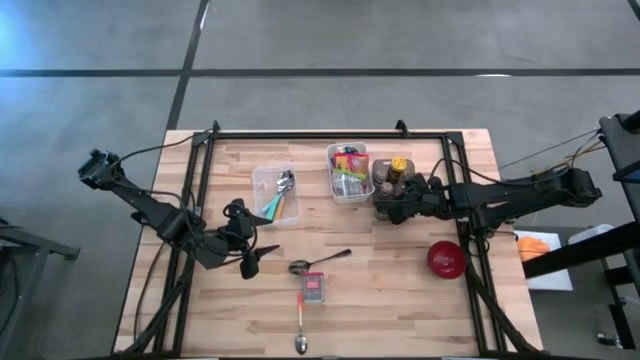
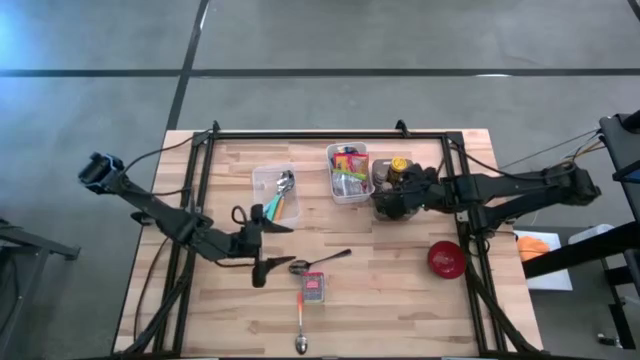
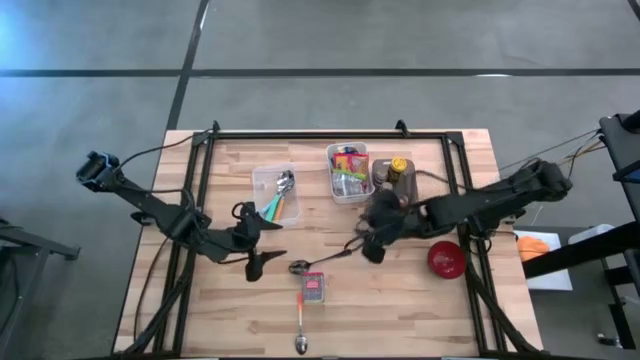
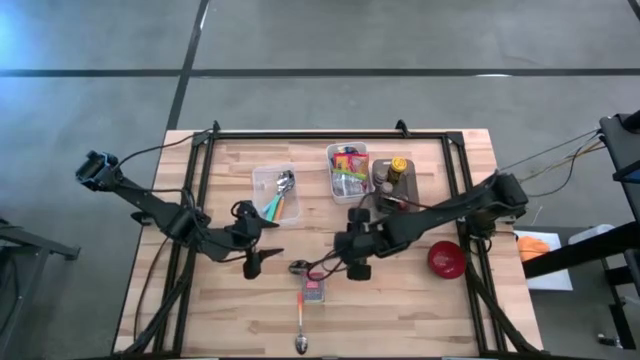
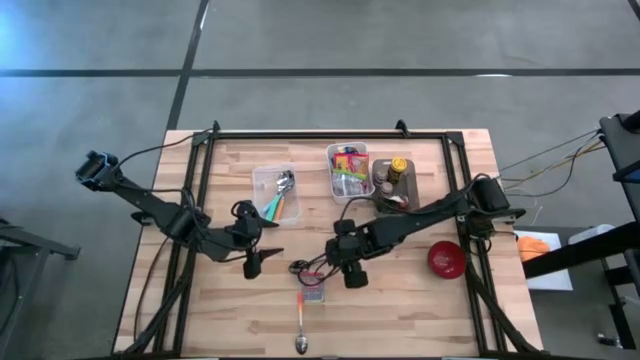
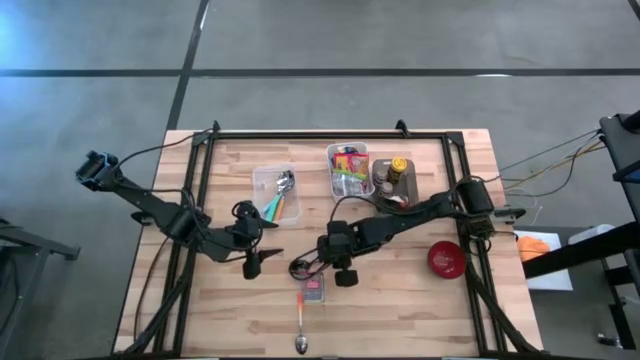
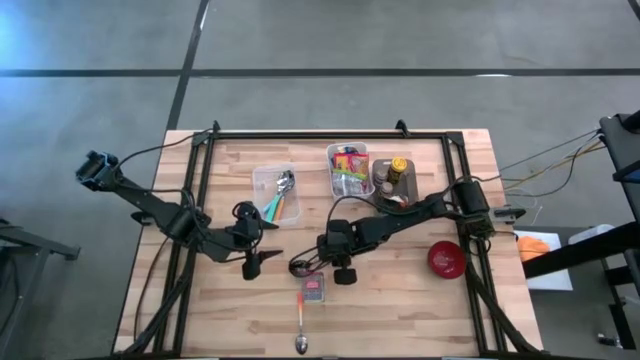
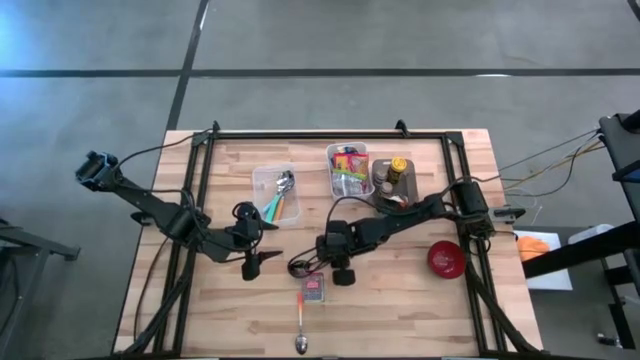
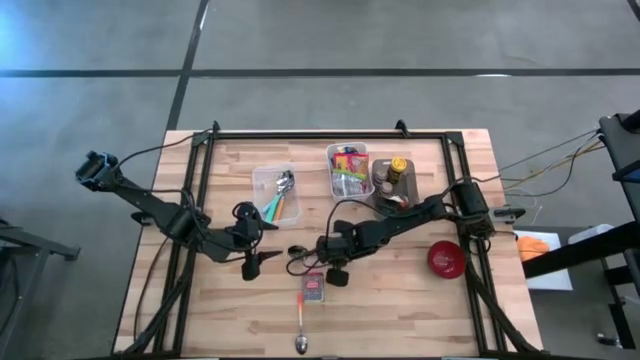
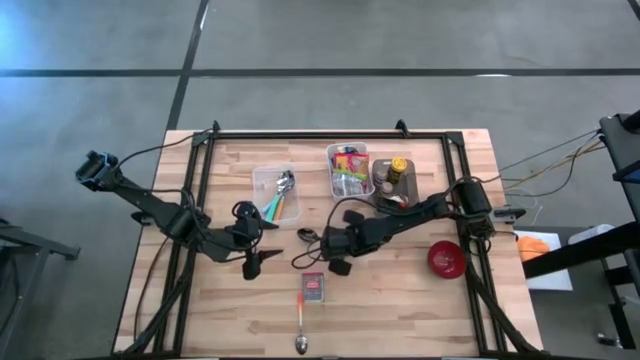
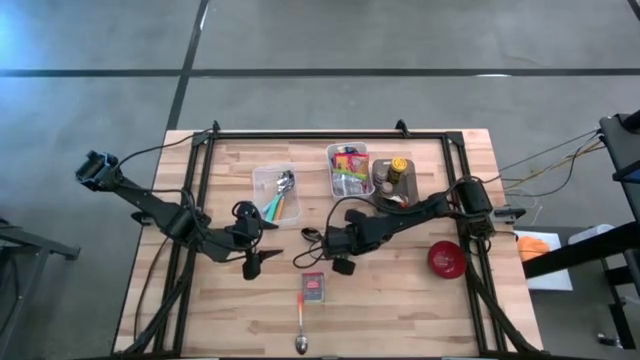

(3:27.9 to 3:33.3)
Put the black spoon into the transparent bin

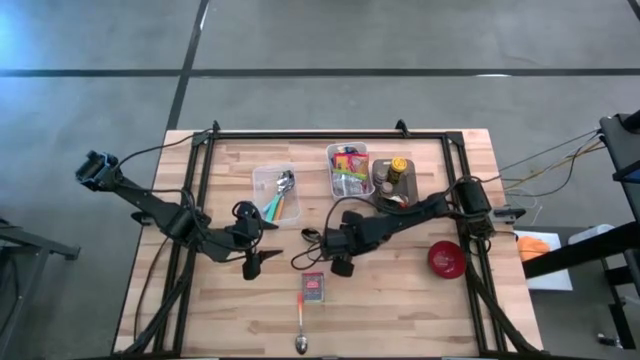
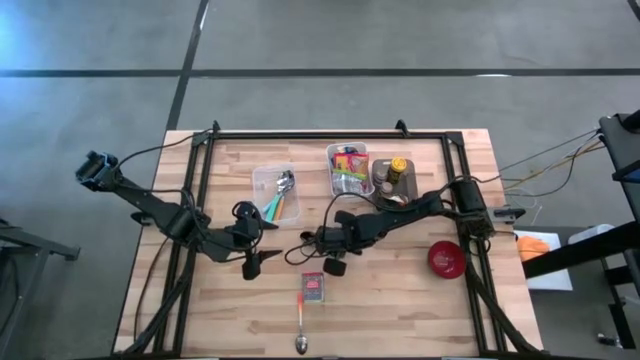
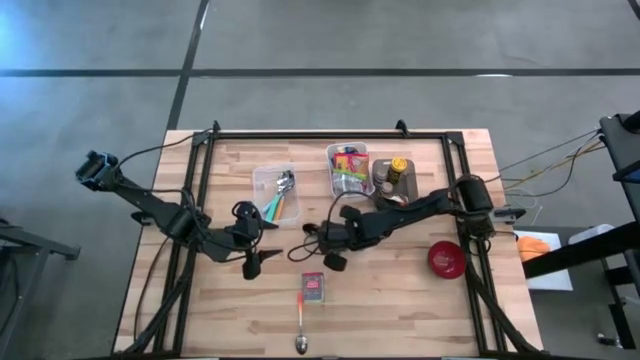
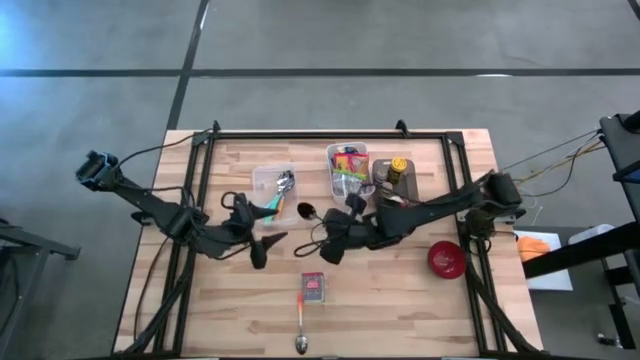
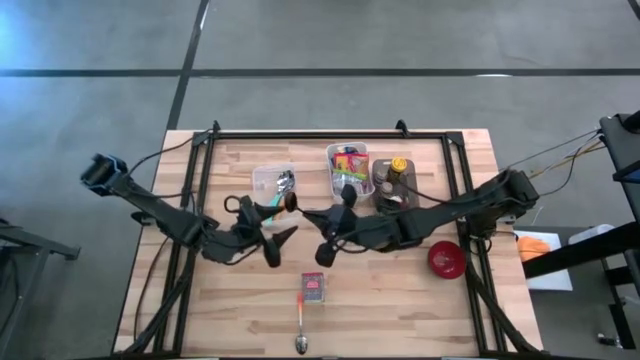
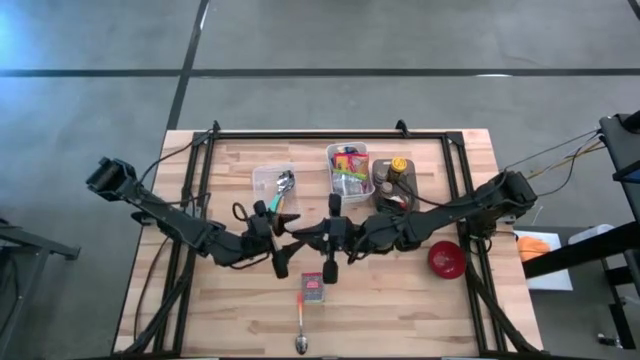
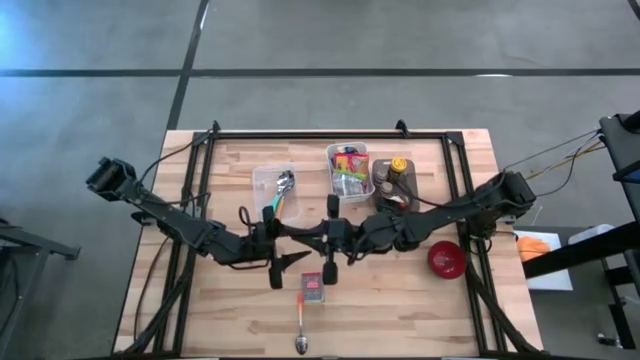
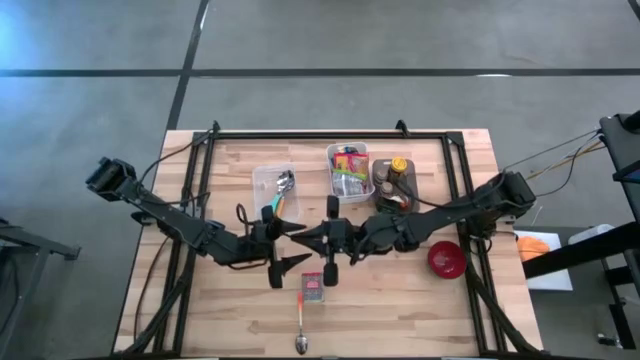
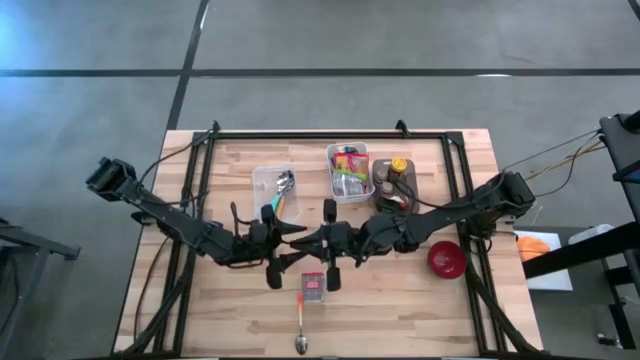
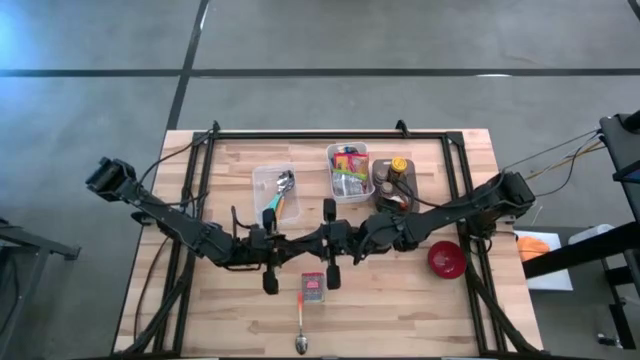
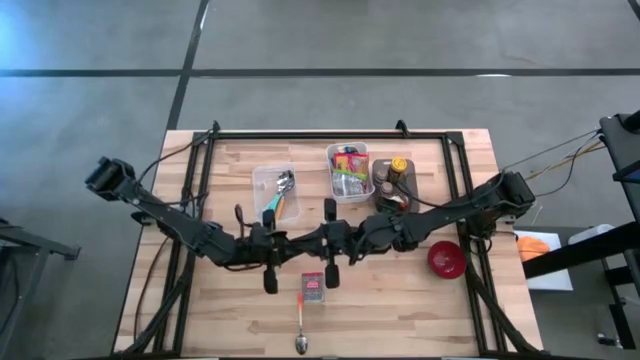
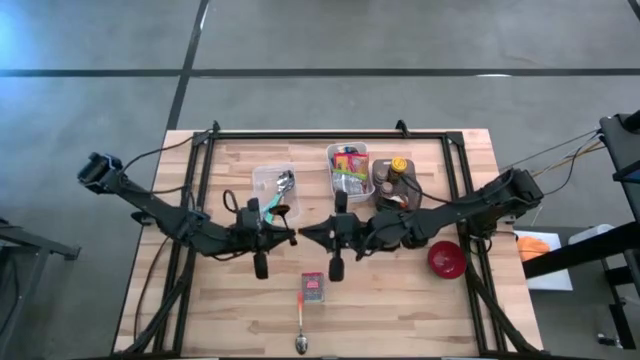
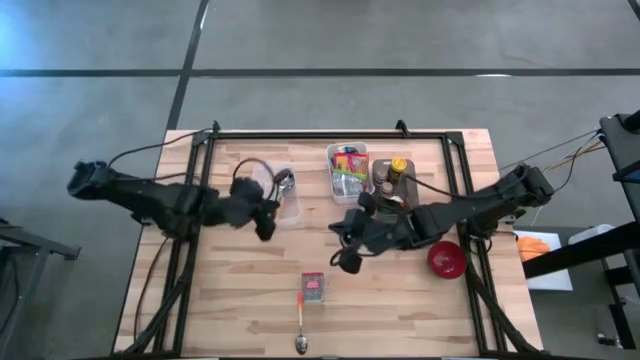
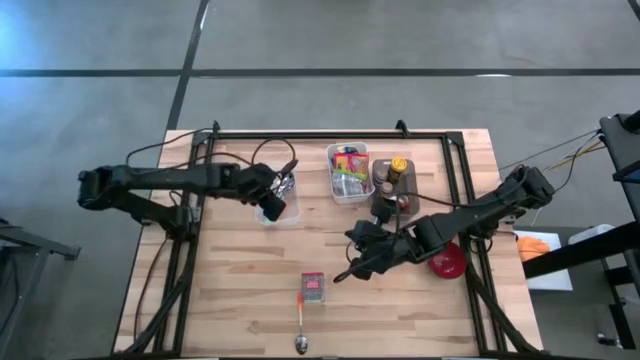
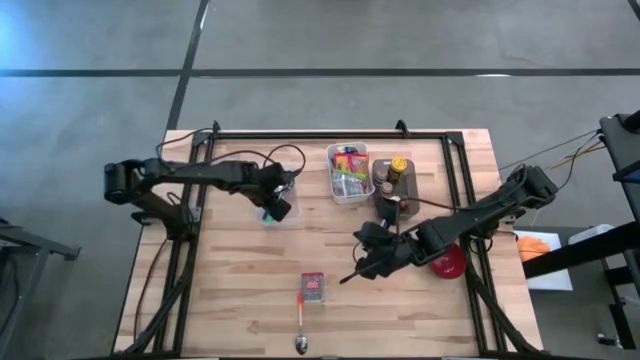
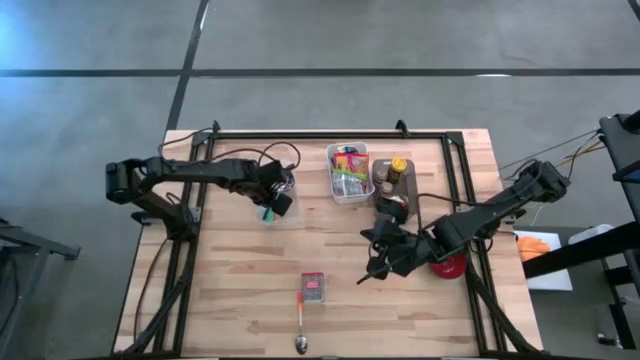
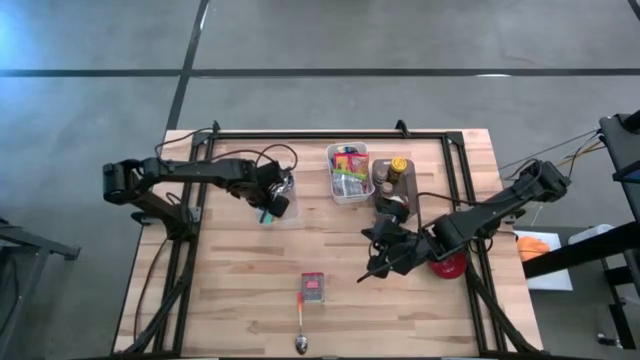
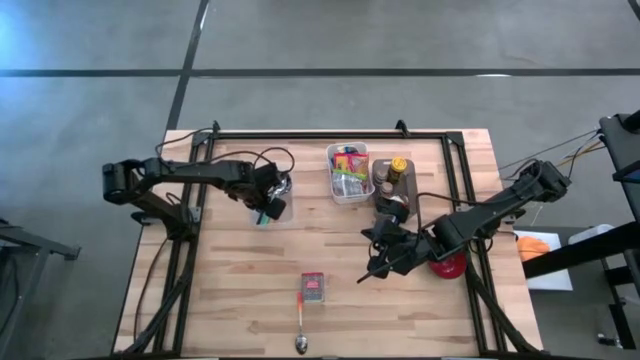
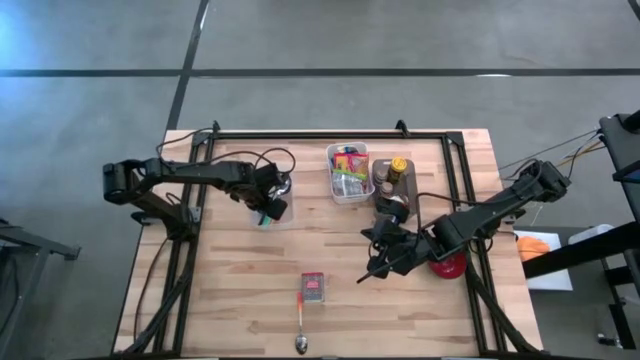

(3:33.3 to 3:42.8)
Put the black spoon into the transparent bin

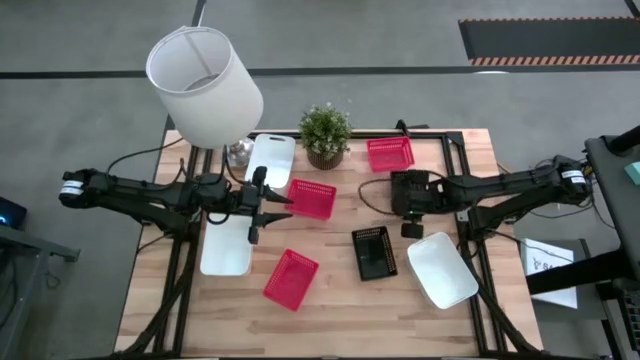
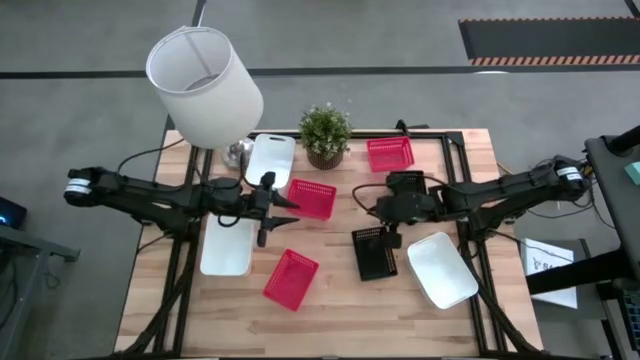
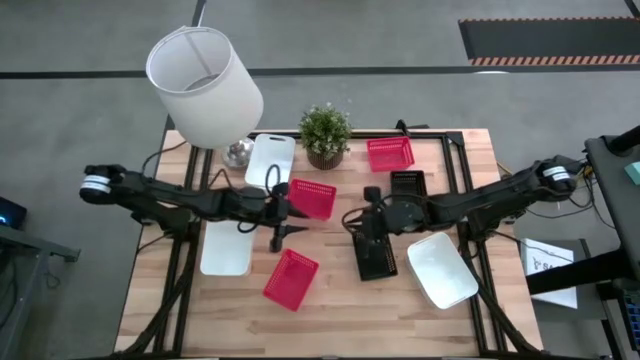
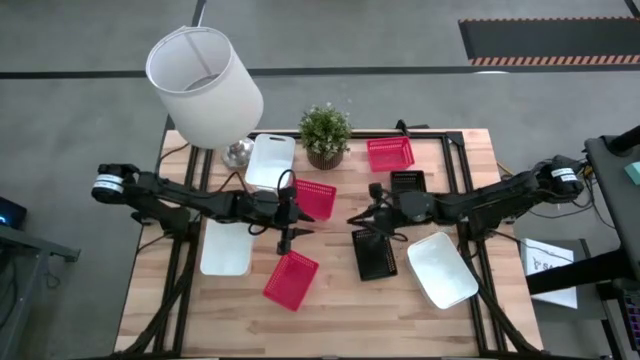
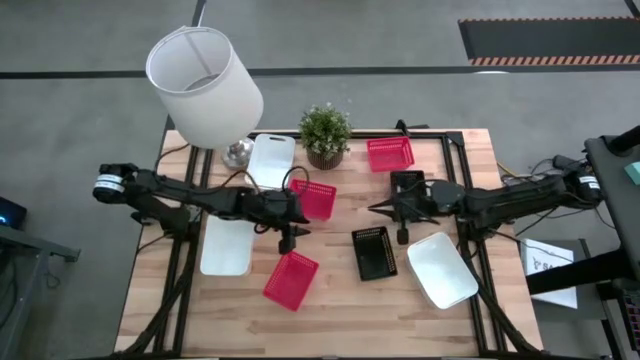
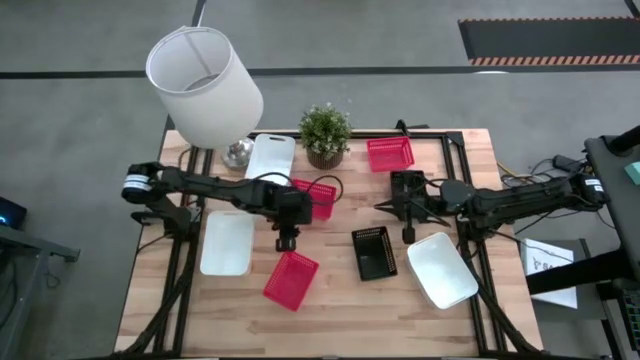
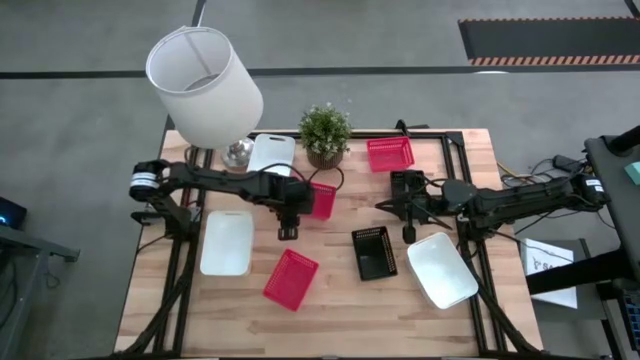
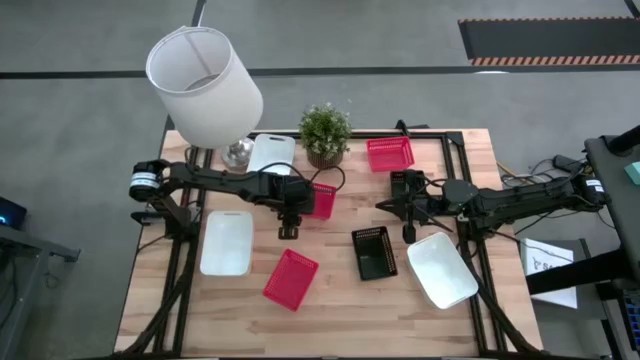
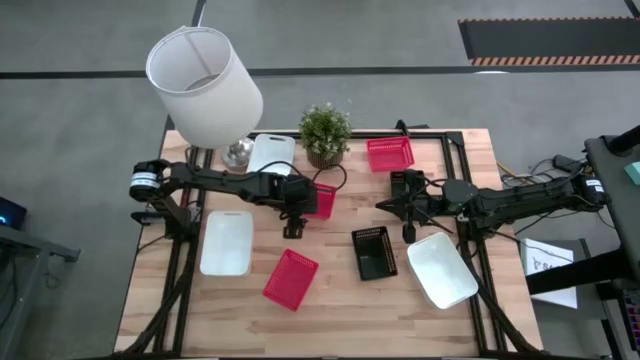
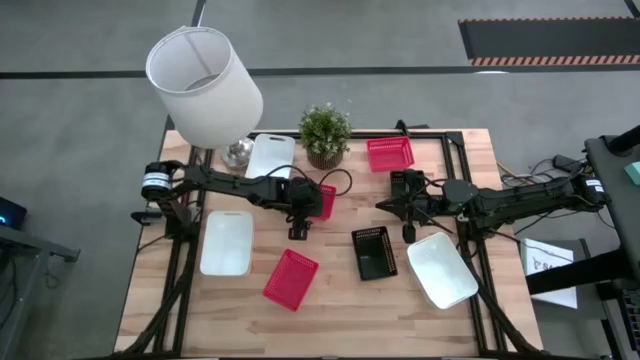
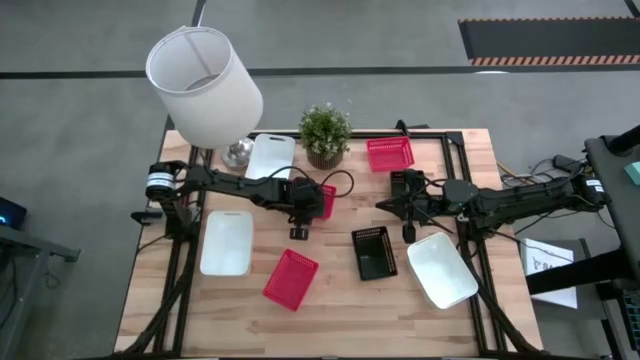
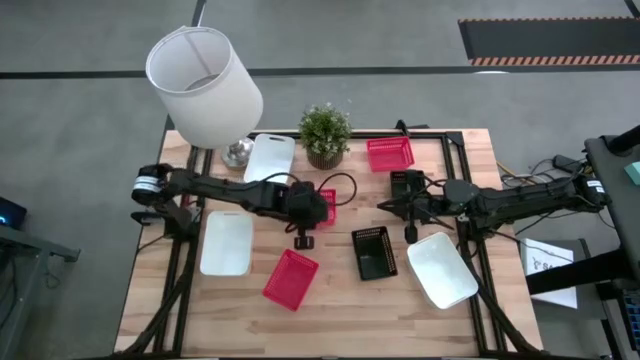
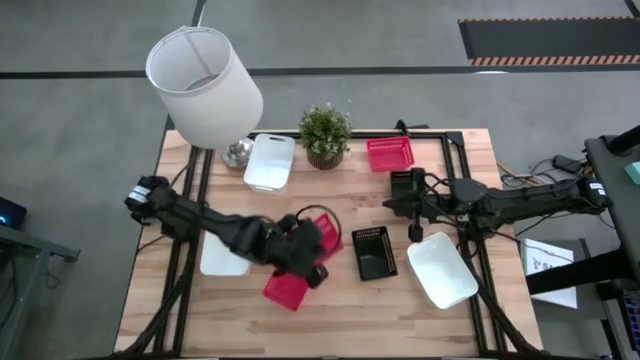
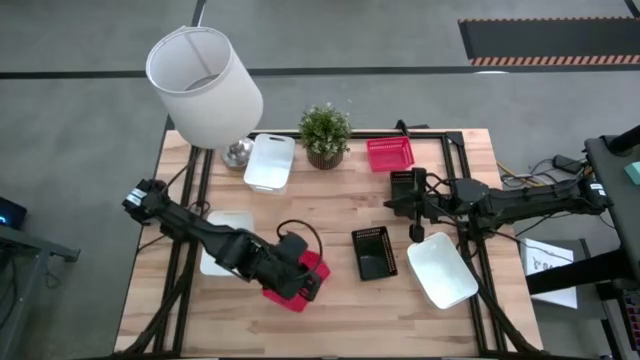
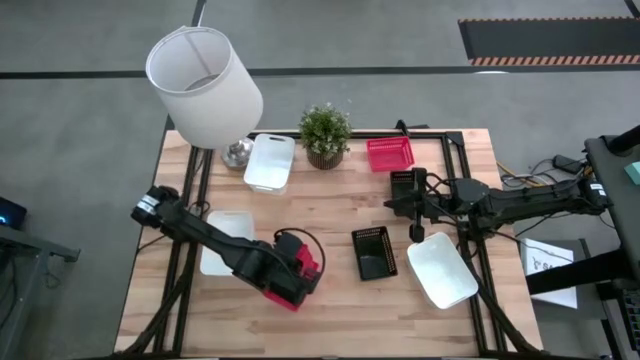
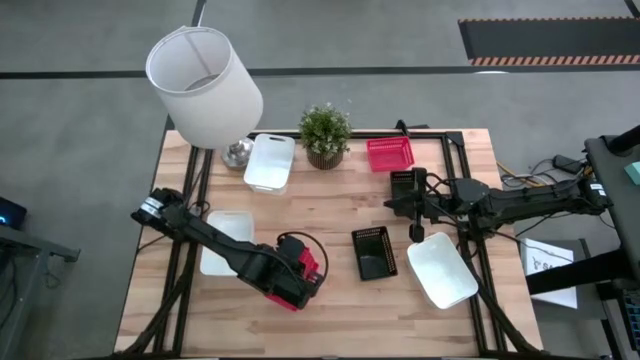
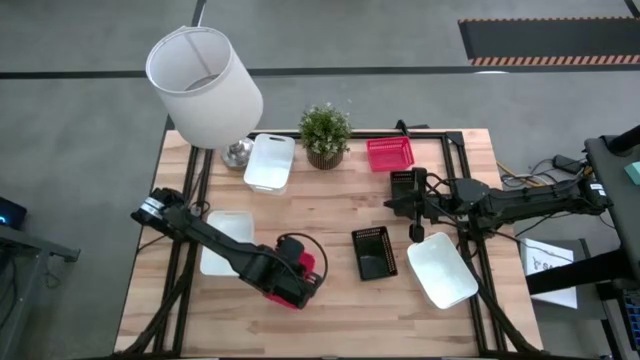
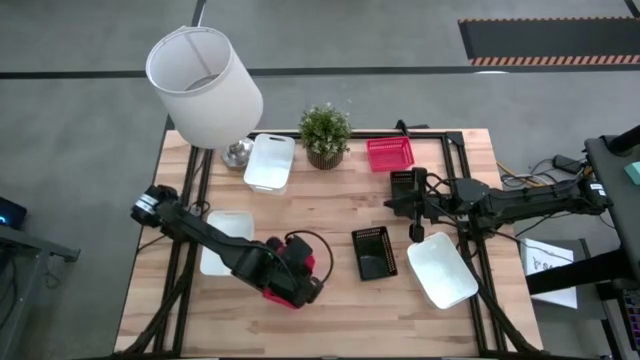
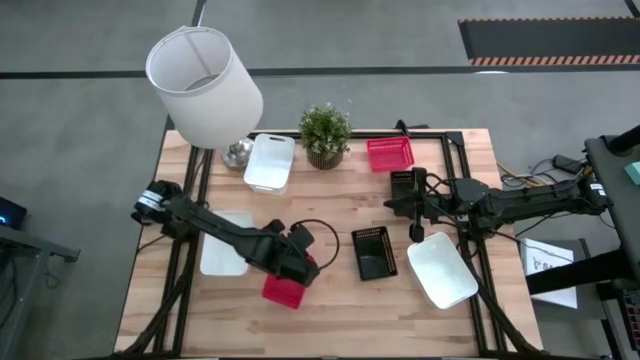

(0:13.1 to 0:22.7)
Stack the middle red bin on the bottom red bin
